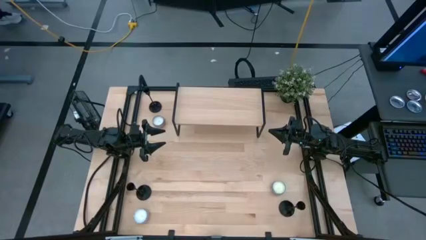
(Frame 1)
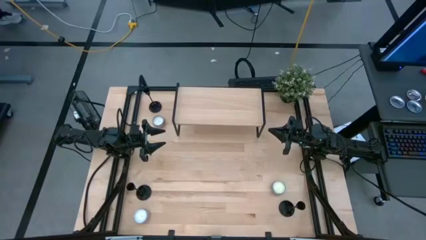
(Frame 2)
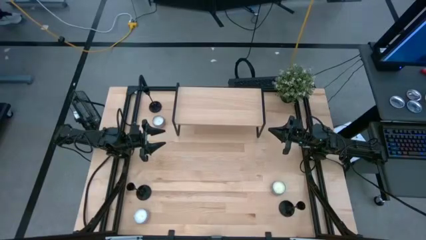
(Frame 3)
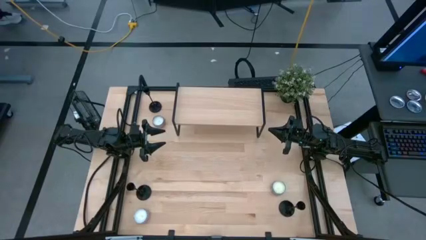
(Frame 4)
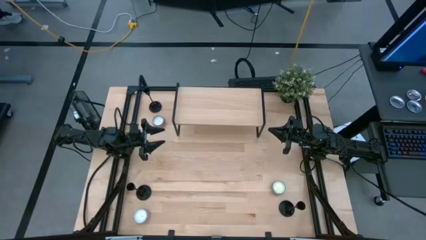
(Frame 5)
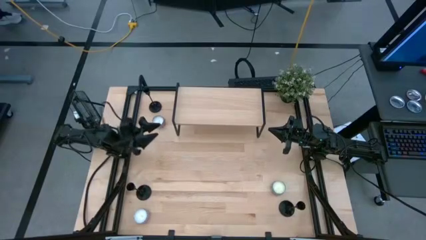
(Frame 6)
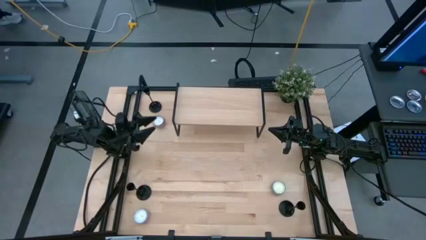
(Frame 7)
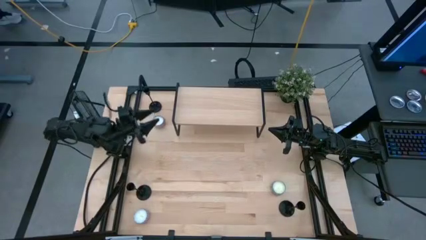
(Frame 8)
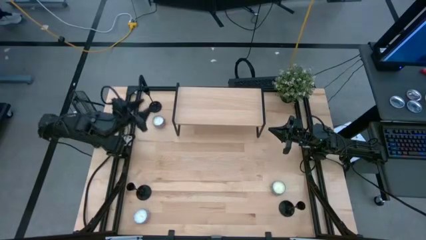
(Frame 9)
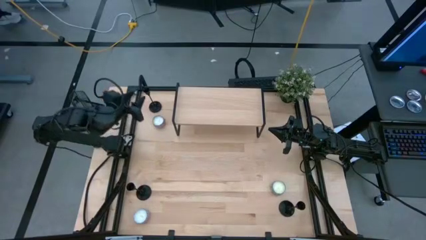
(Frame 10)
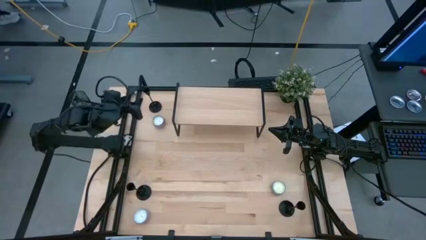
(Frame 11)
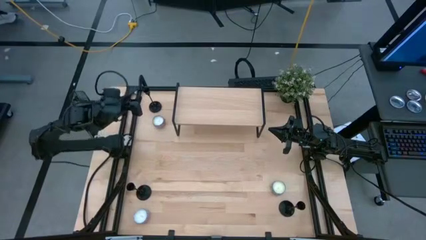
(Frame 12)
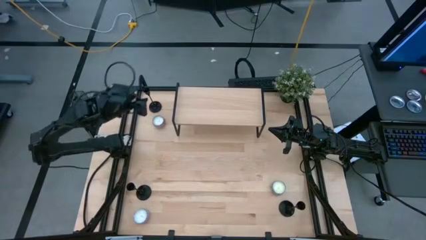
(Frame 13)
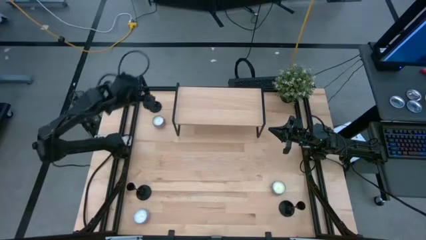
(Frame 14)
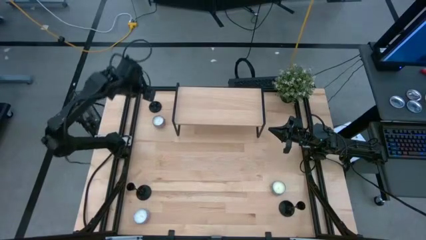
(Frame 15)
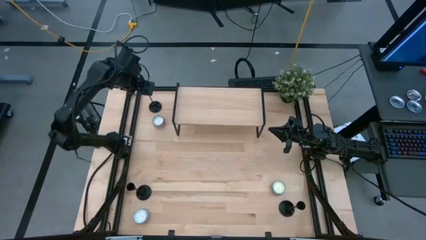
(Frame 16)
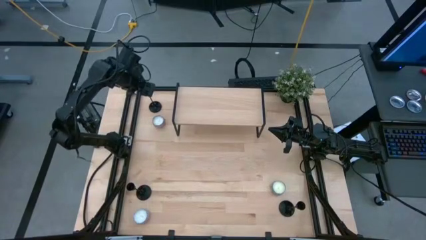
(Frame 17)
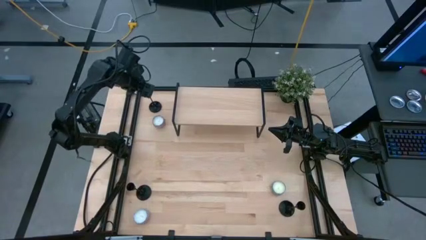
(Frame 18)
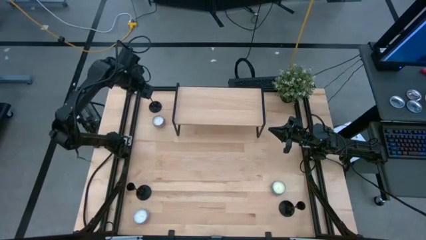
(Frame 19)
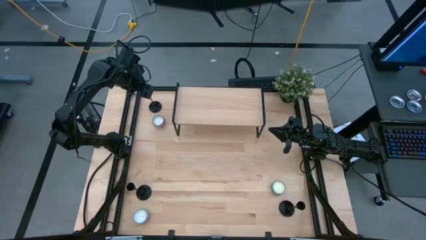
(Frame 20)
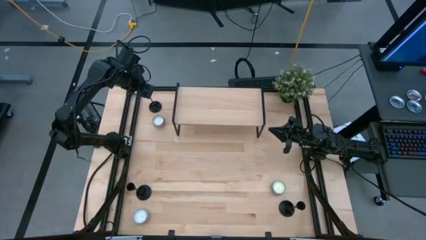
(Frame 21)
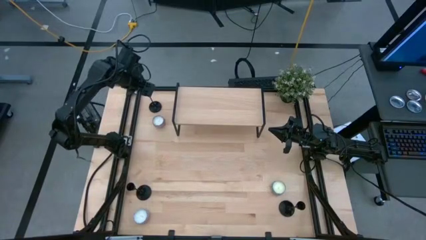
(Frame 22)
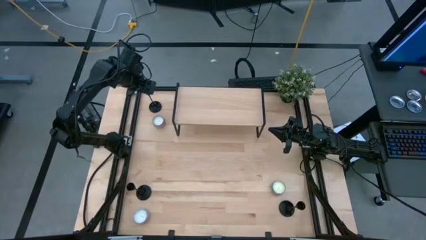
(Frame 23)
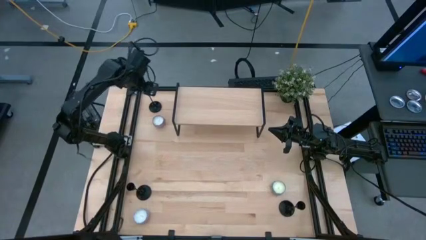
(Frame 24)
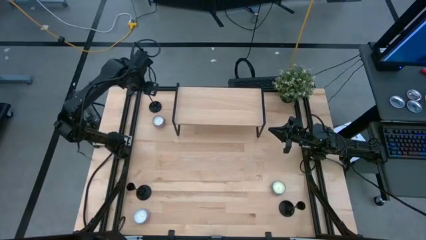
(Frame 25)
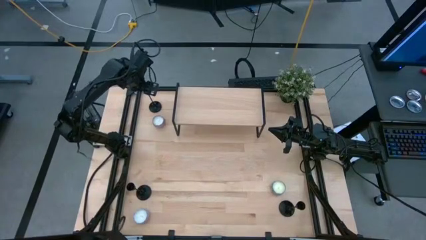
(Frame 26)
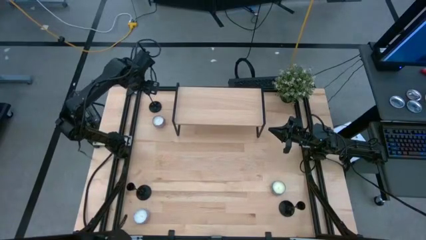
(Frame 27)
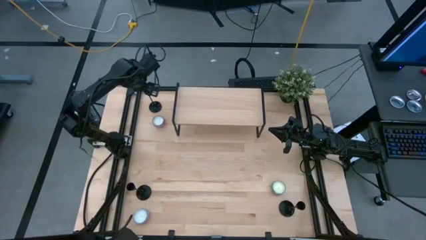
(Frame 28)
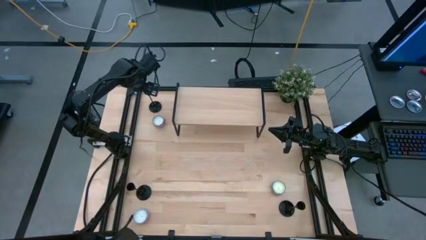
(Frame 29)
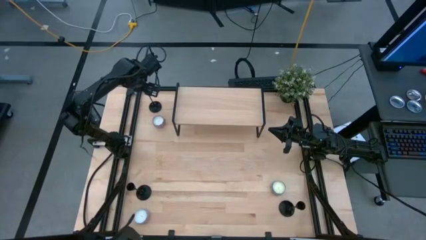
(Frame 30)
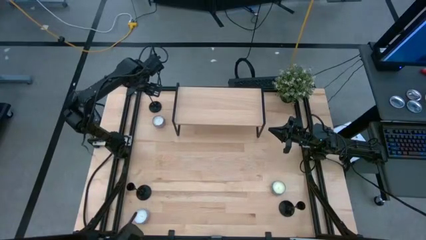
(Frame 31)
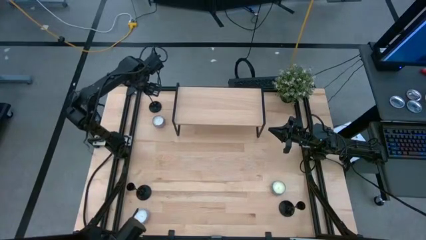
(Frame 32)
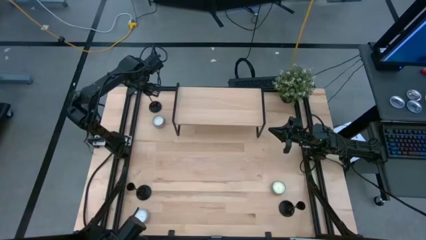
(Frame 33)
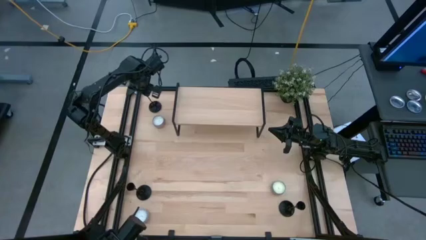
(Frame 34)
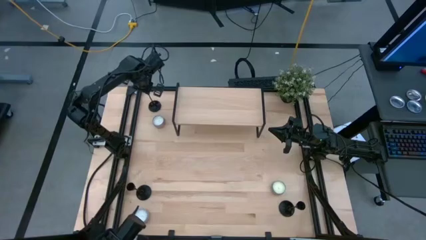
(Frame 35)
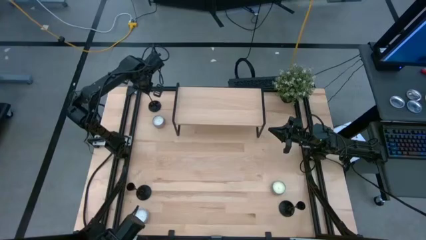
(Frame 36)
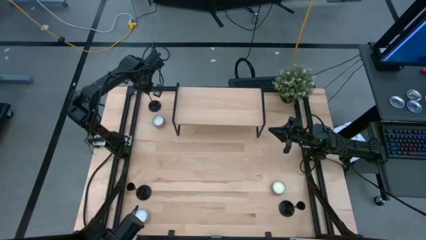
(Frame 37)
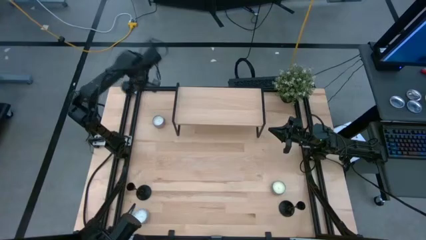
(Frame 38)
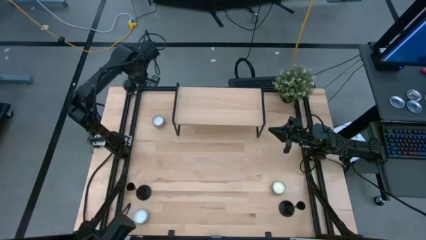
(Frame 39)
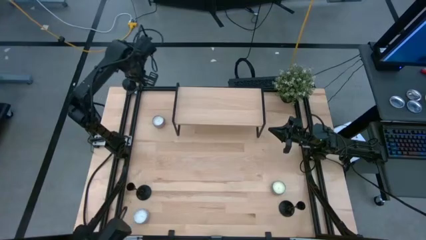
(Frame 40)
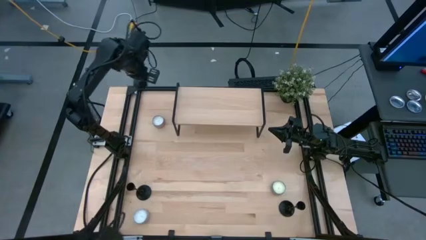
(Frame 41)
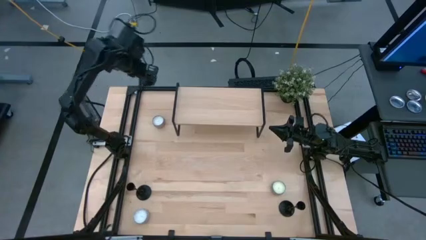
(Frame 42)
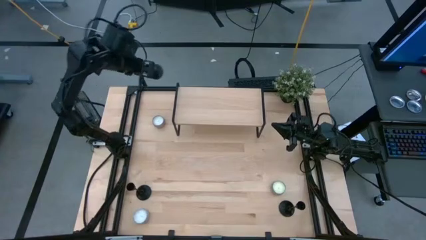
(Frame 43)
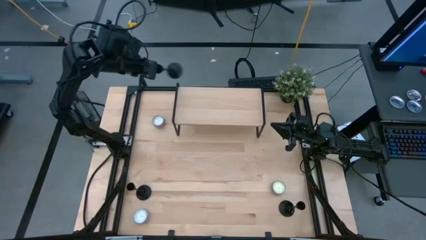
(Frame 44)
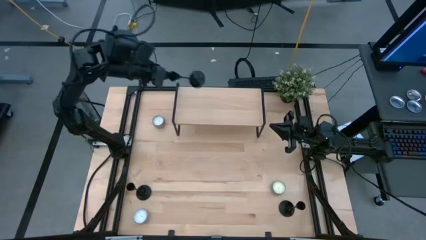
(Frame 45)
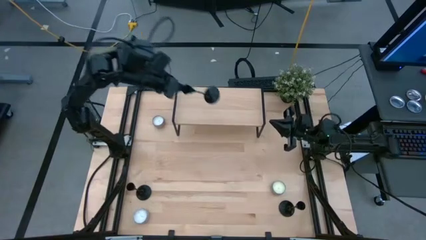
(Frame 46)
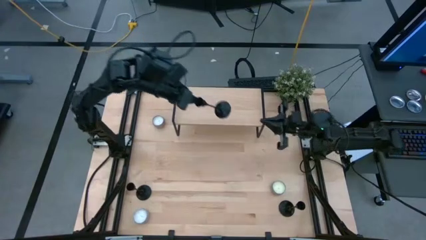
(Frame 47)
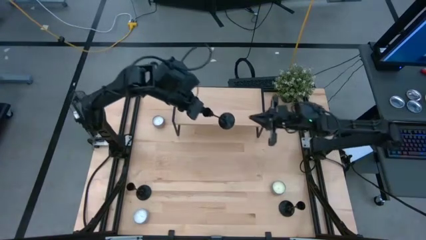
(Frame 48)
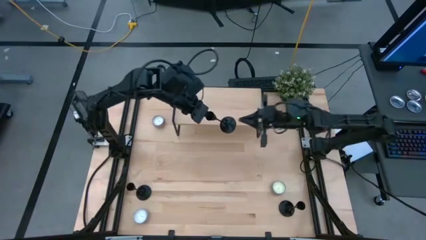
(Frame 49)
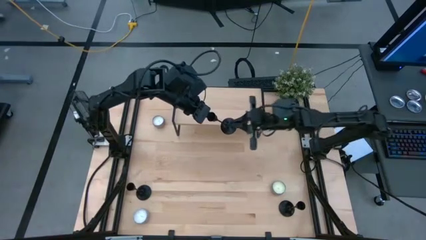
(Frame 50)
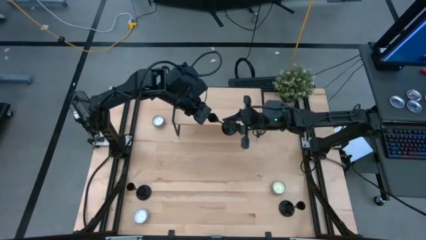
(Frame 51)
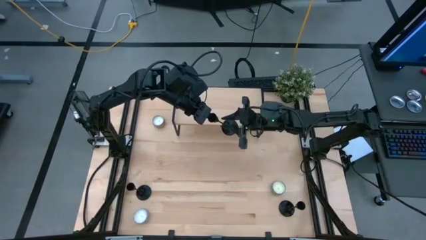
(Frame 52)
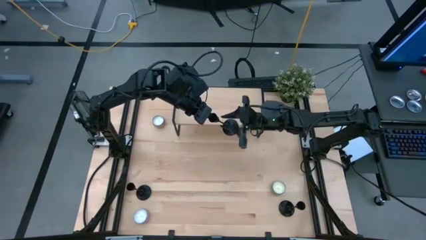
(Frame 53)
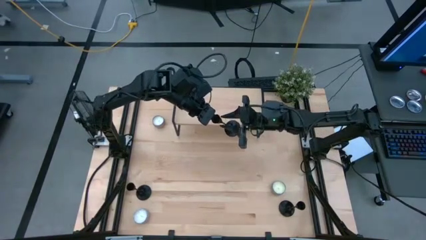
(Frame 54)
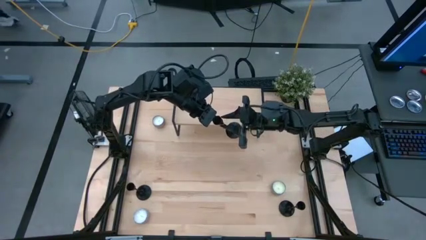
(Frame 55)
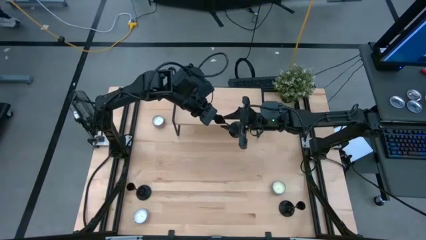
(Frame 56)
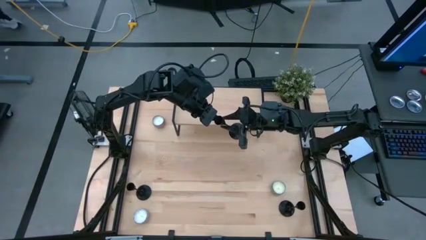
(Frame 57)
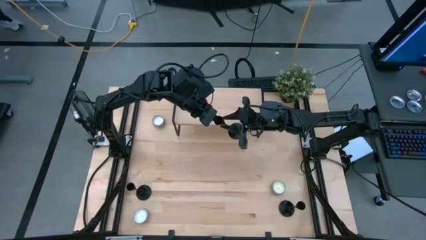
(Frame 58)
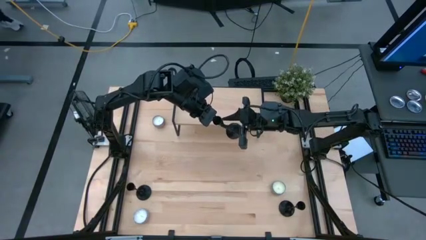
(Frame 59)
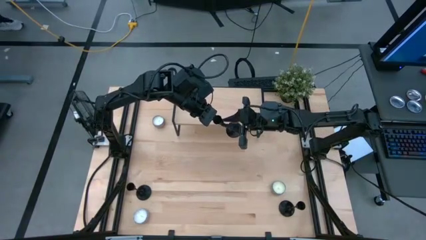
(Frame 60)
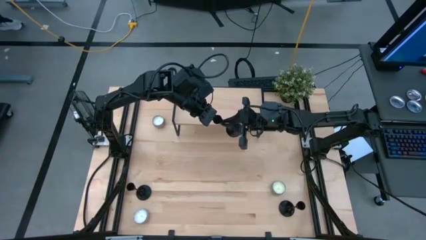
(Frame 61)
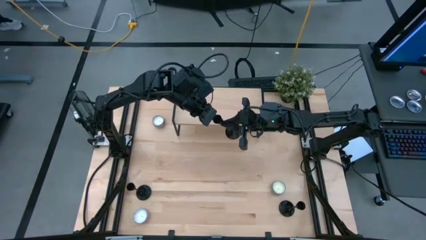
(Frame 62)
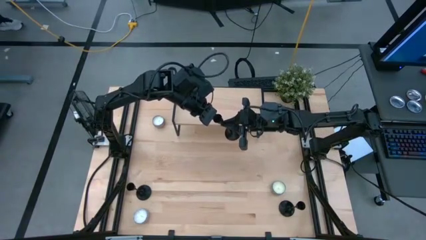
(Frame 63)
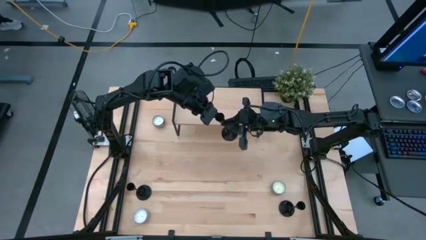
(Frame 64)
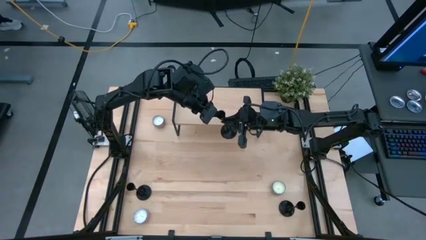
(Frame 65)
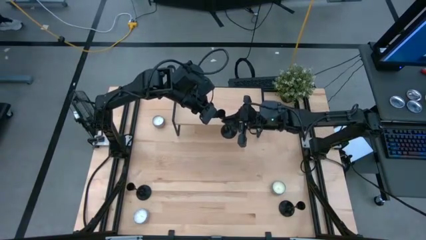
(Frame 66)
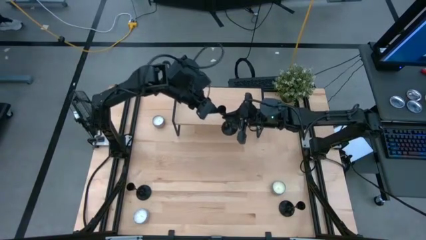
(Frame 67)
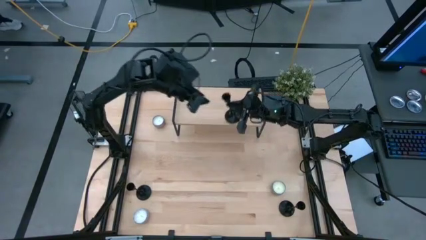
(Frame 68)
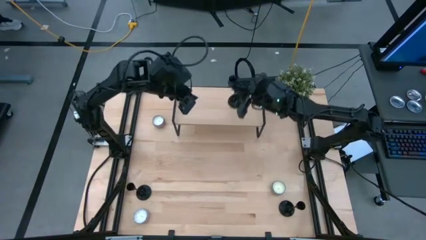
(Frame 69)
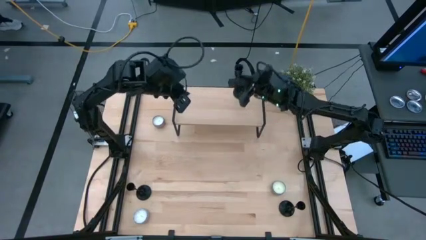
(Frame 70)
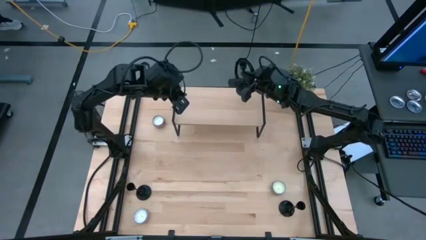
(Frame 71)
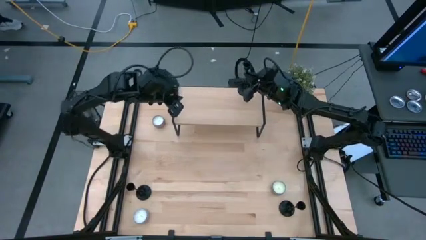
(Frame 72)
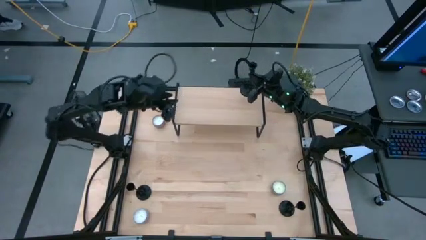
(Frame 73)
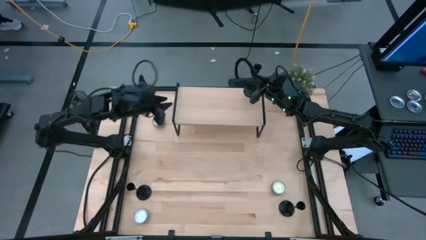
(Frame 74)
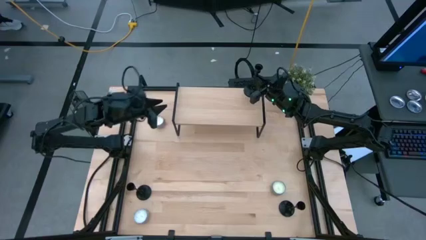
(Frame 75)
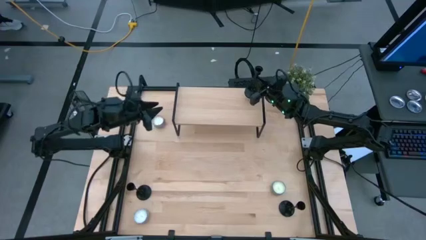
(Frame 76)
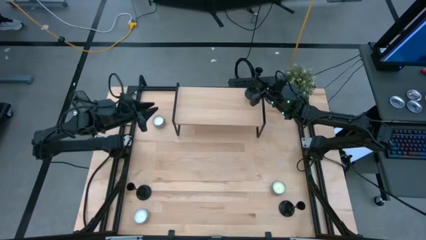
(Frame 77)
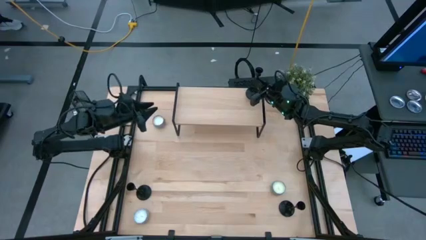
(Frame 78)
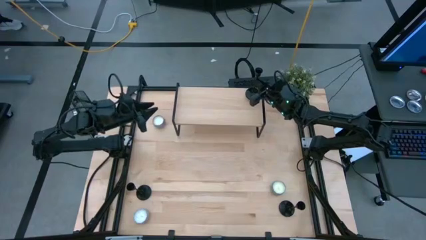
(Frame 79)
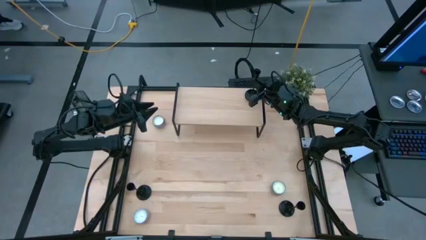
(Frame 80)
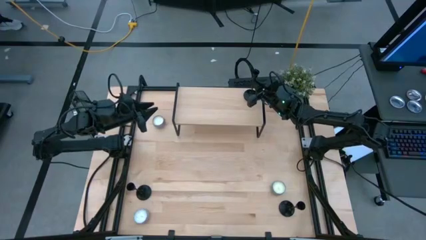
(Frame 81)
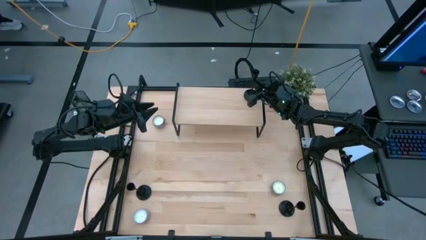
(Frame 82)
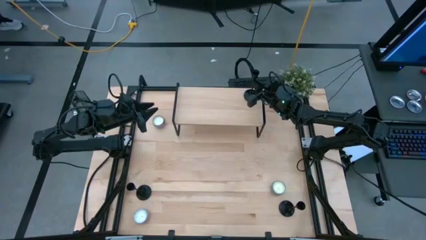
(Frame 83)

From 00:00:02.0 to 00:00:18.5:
Task: Pick & Place candle stick holders
Put the top black candle holder on the shelf
